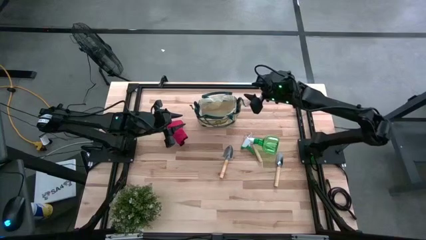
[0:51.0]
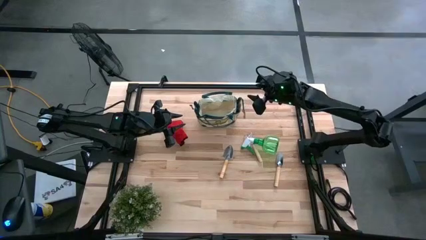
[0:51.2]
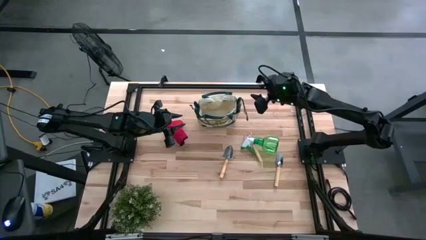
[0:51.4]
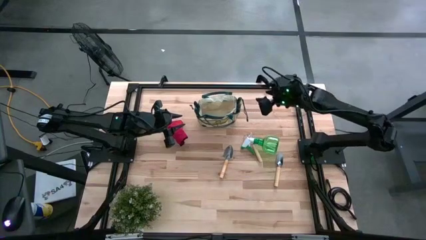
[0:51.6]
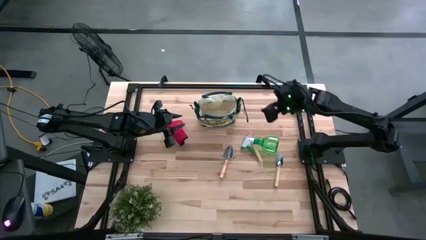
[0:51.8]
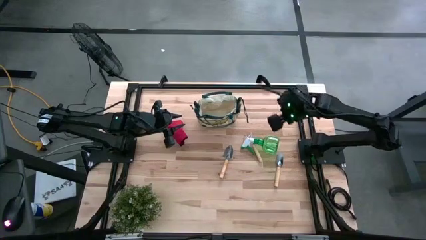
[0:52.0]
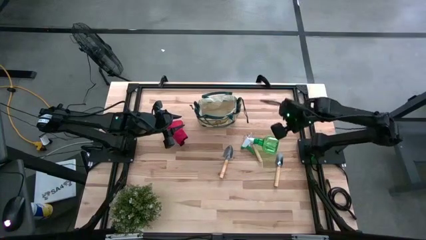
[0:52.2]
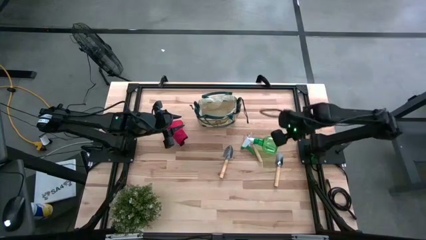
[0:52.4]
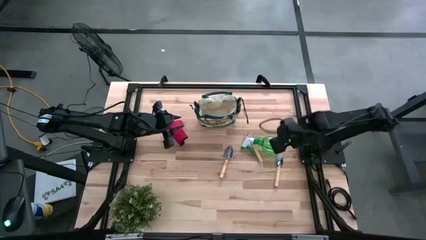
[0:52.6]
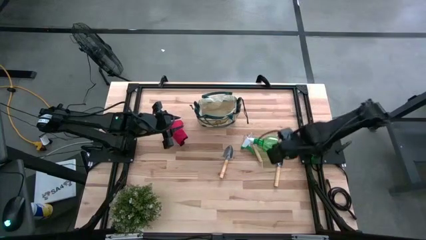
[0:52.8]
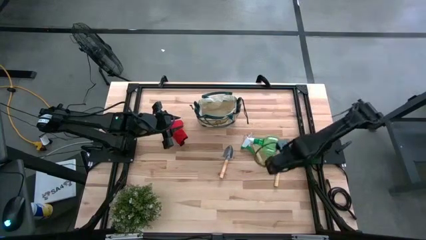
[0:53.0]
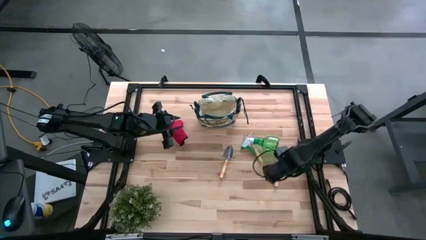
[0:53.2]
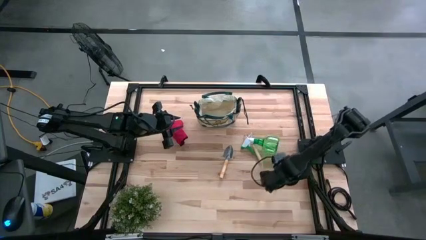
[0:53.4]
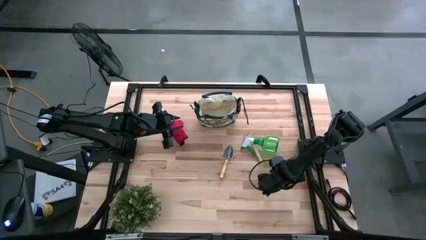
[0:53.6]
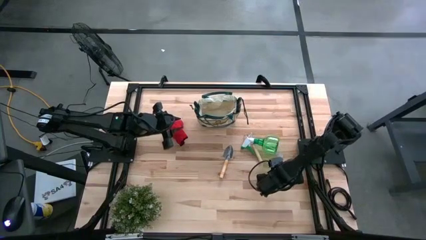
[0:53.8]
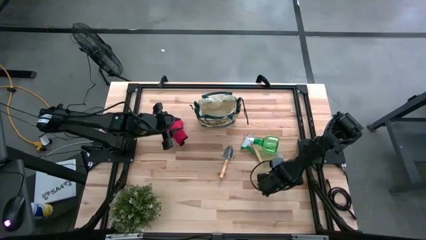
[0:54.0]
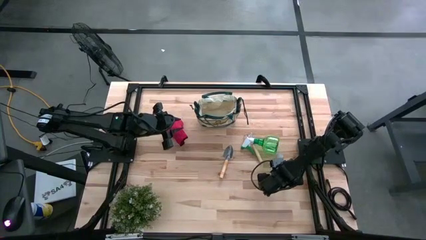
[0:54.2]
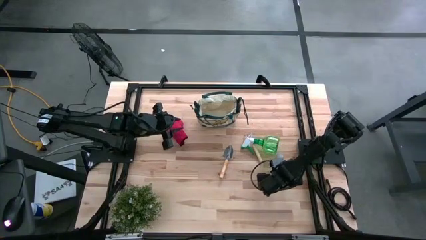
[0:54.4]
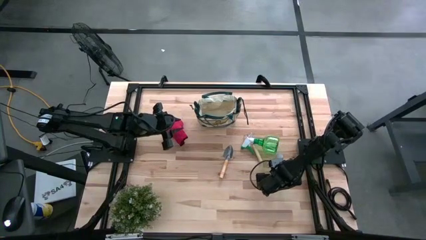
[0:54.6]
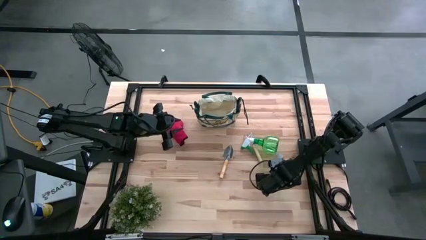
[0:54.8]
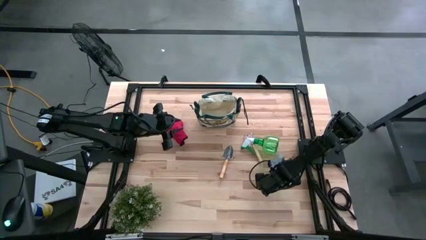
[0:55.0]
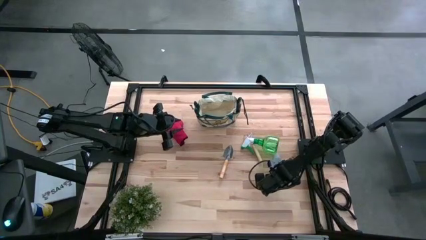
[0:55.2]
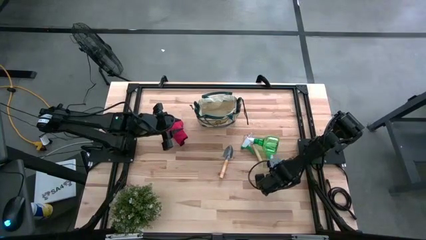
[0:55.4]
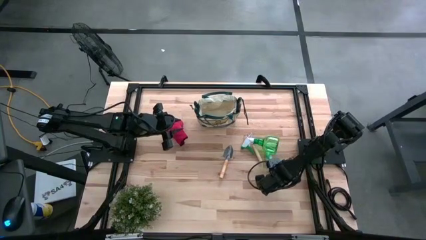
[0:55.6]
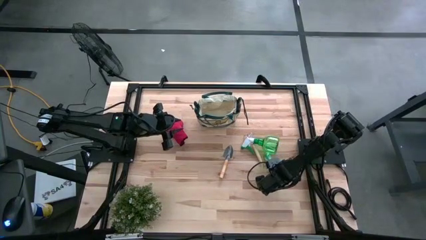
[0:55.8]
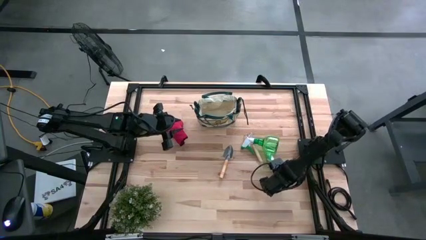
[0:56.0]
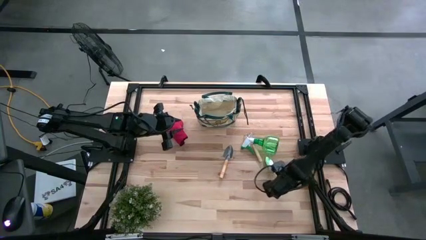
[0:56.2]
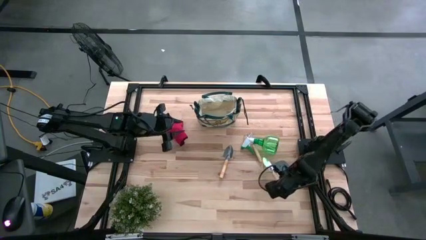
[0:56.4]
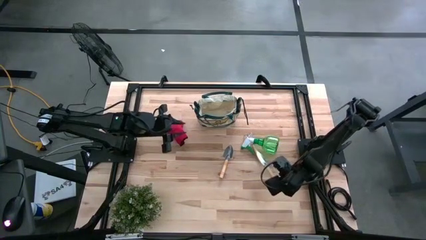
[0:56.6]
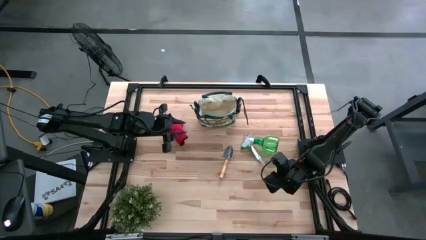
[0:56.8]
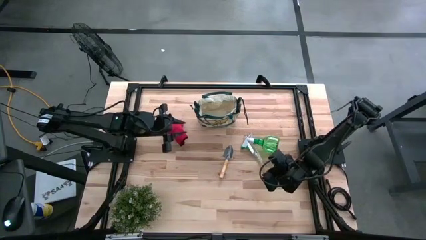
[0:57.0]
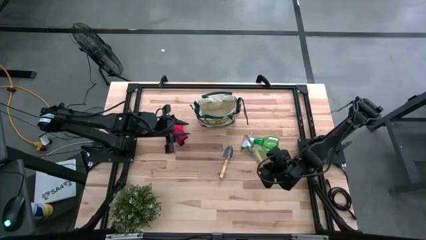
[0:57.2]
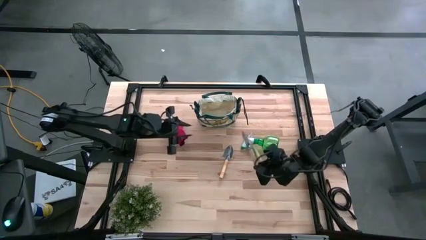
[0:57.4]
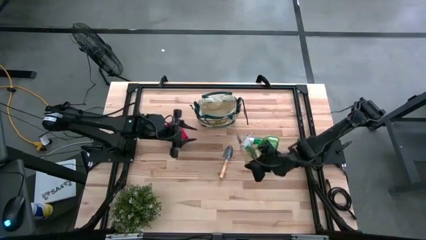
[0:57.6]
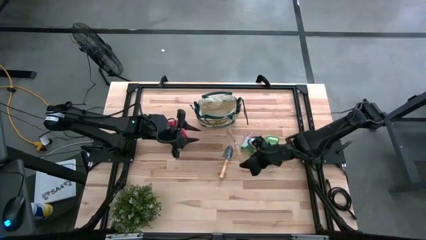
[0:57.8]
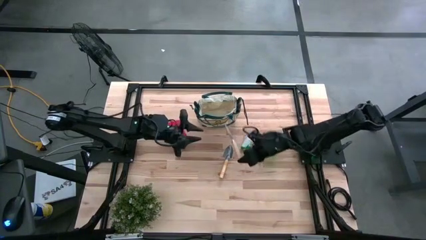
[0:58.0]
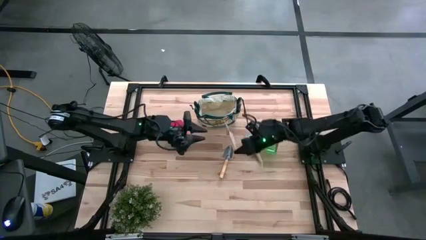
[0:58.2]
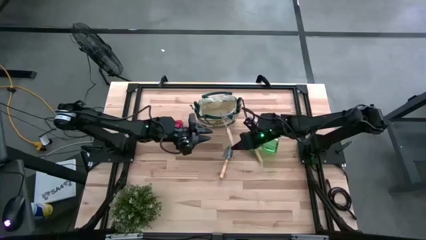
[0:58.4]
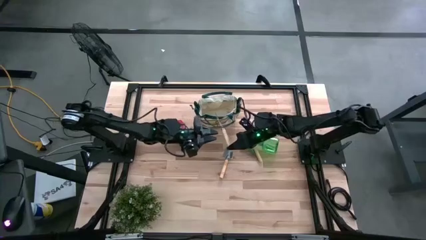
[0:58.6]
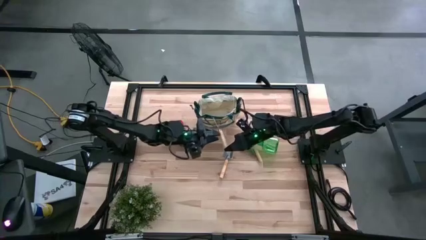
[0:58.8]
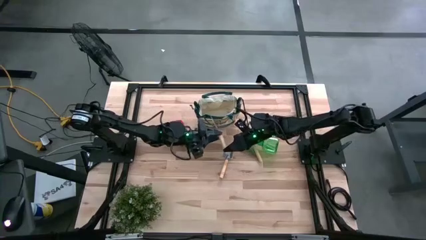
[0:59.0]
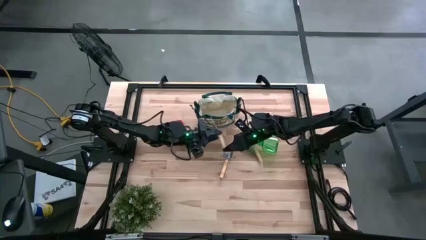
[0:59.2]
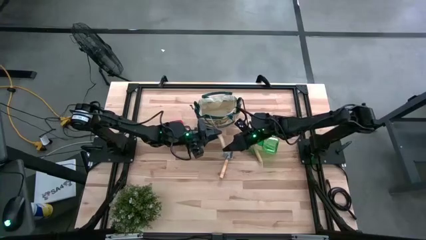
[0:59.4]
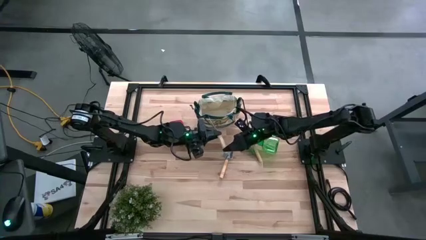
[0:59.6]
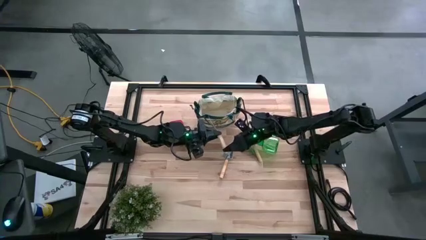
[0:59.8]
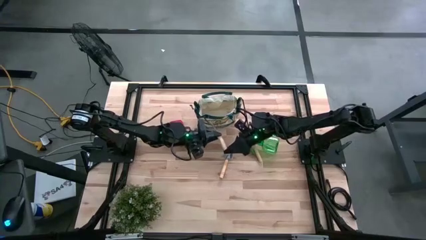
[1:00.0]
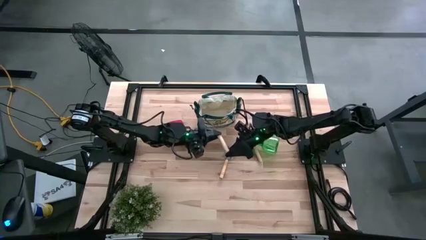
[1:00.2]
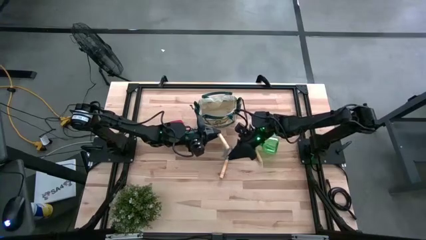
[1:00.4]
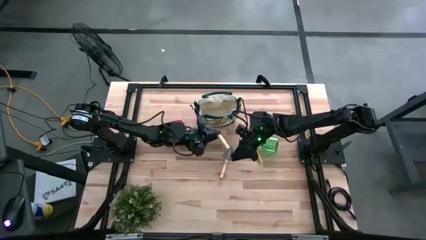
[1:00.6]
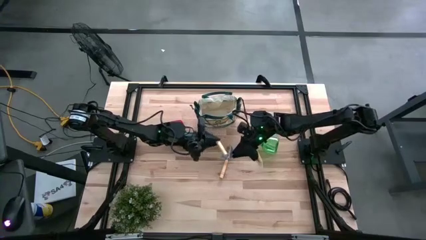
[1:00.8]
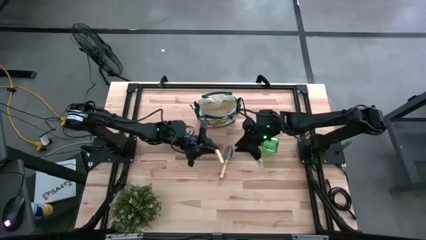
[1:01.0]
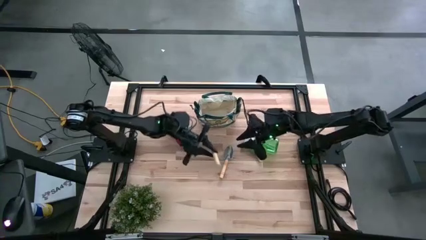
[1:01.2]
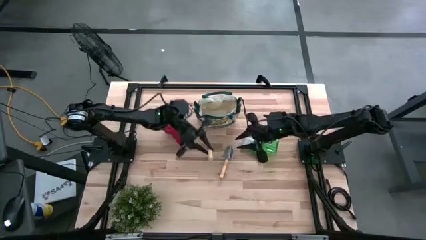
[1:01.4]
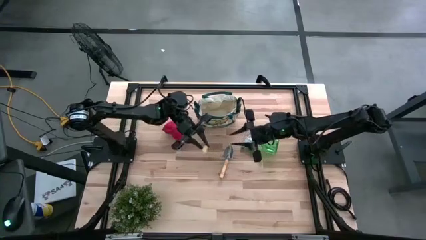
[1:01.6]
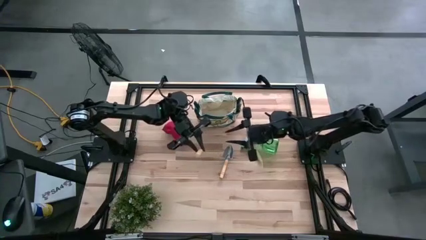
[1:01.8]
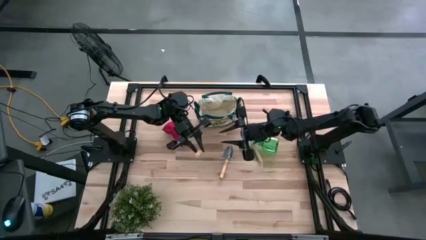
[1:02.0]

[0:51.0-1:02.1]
Task: Pick & Place Garden tools in Gardening bag
Put the right brown trowel into the gardening bag

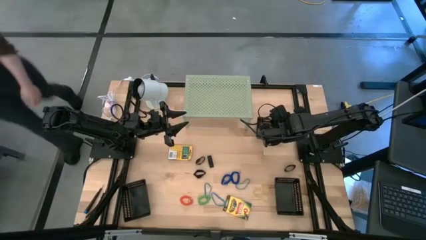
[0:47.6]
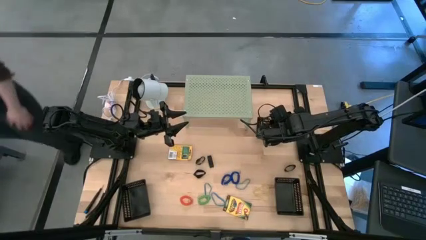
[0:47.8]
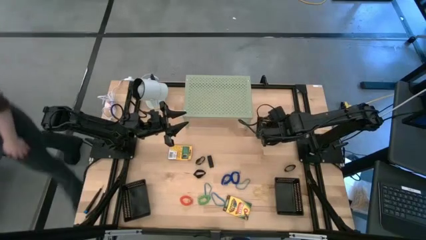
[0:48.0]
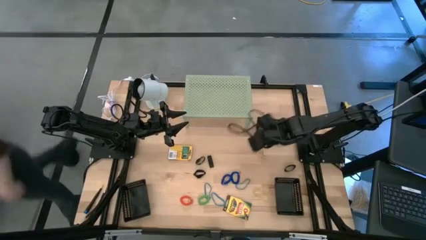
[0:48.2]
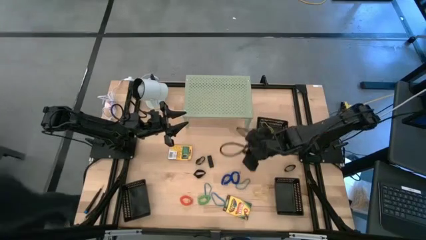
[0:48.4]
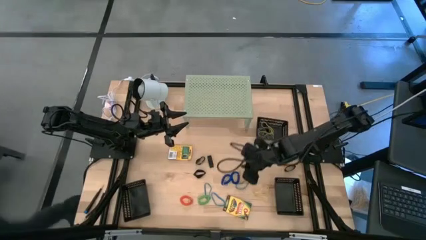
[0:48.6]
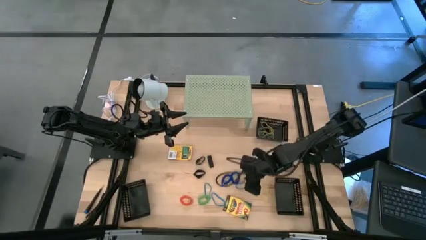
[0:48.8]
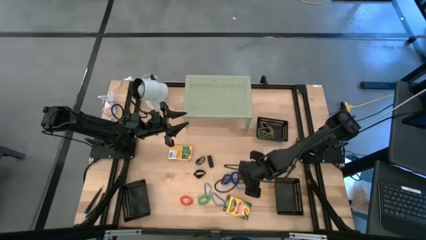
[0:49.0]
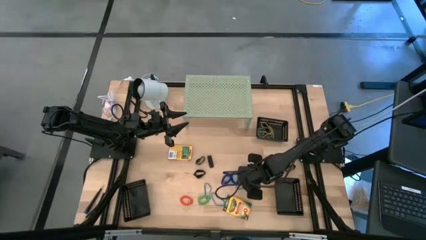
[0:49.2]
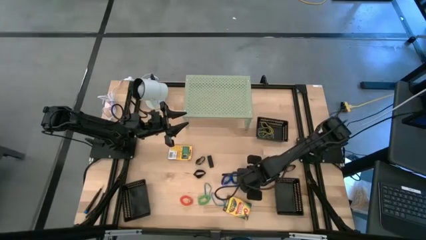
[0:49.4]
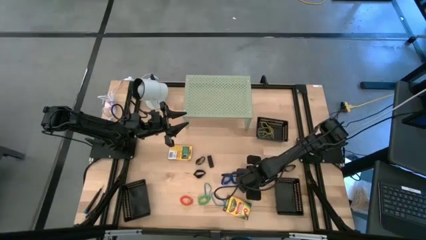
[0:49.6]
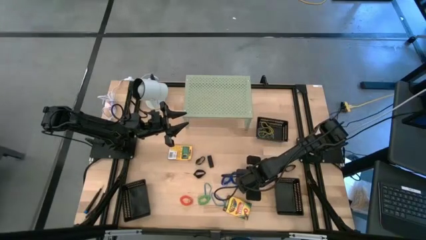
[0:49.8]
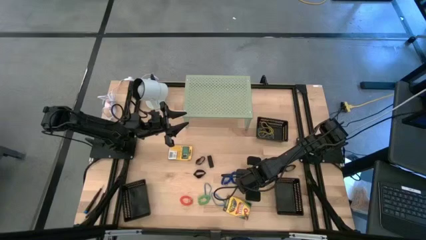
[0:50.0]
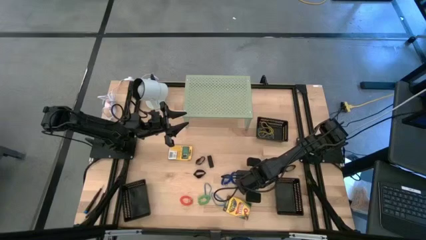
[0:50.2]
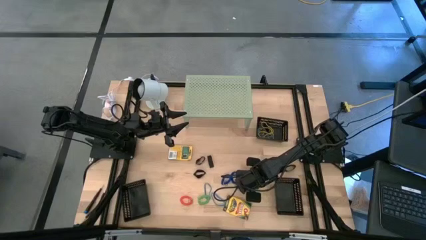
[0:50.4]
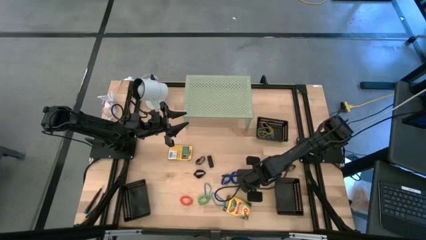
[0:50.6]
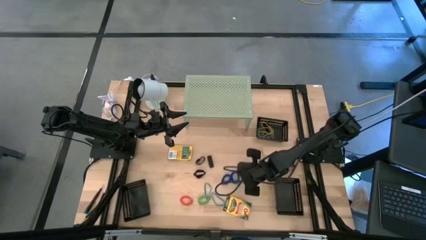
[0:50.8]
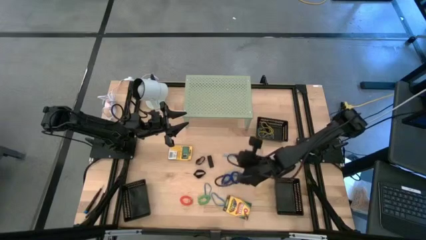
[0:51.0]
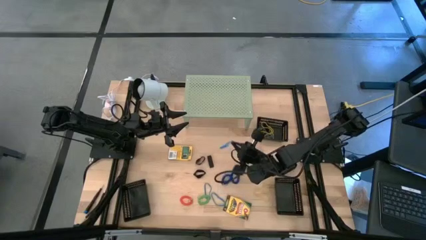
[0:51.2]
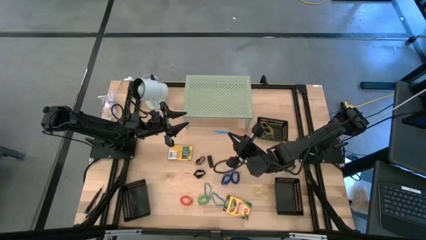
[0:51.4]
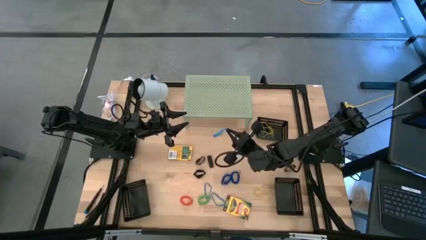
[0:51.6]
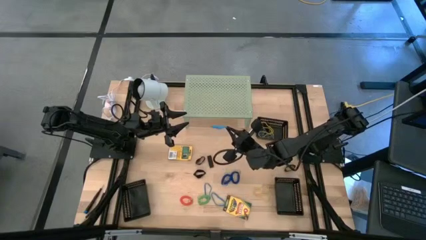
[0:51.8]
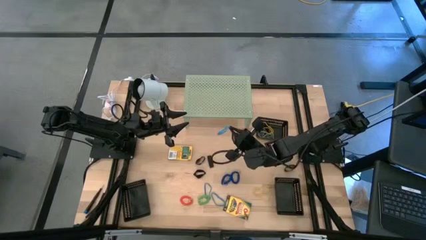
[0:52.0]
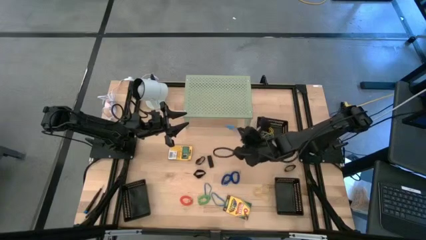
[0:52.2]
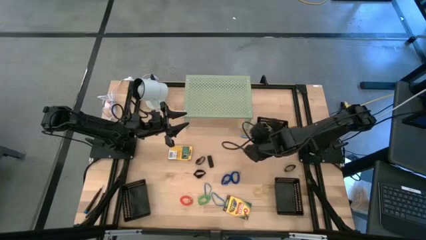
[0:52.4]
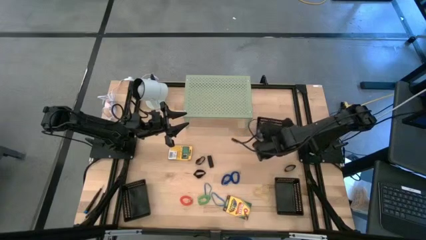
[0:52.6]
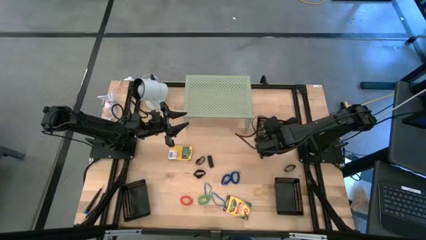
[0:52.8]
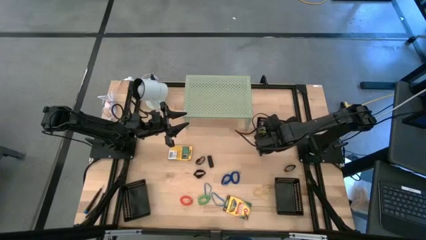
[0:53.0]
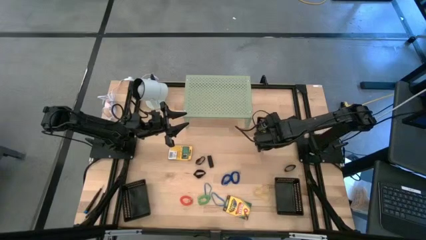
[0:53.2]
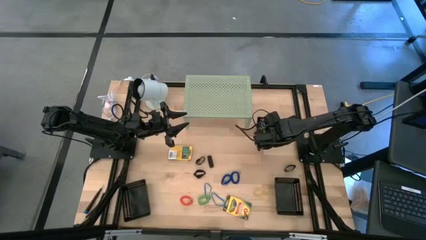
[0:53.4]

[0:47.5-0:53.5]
Task: Pick & Place Office Desk Supplies
Put the blue rubber band into the top right black bin
